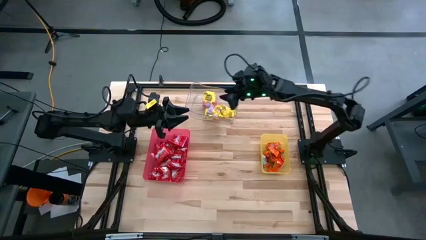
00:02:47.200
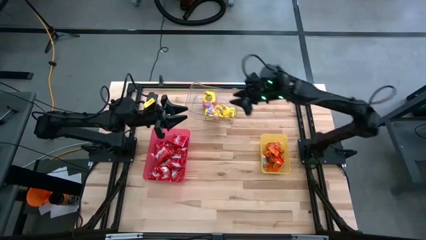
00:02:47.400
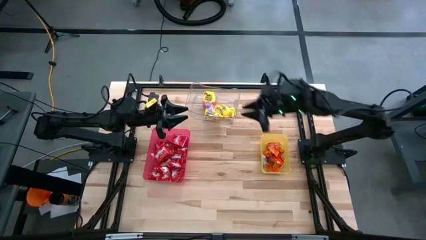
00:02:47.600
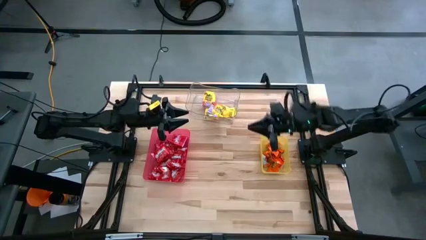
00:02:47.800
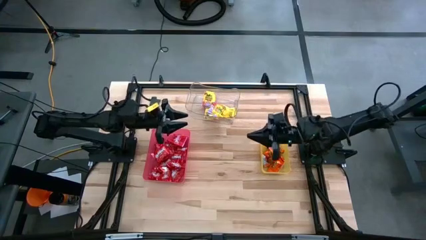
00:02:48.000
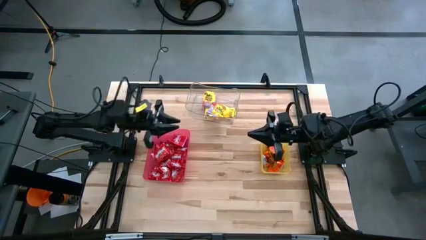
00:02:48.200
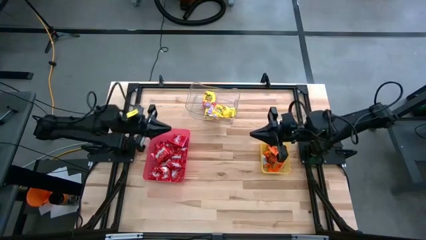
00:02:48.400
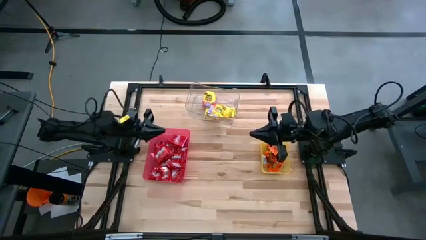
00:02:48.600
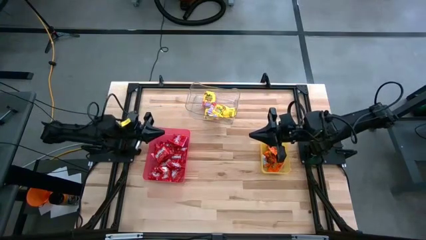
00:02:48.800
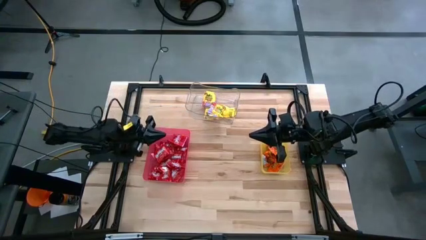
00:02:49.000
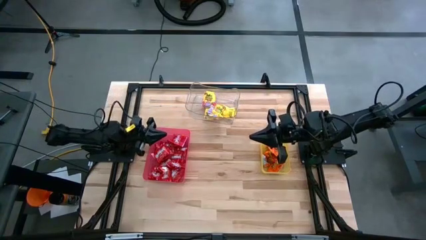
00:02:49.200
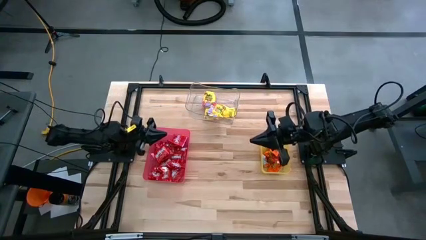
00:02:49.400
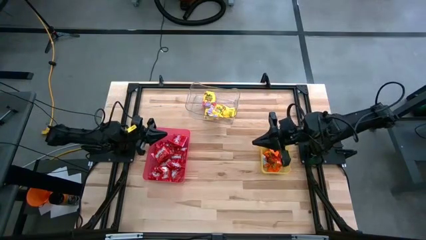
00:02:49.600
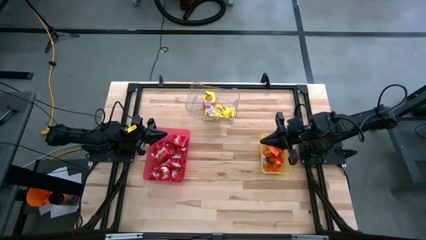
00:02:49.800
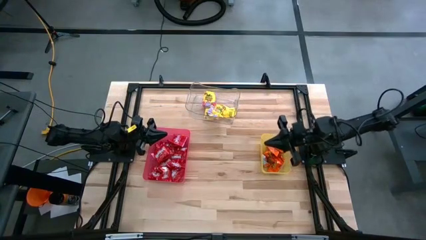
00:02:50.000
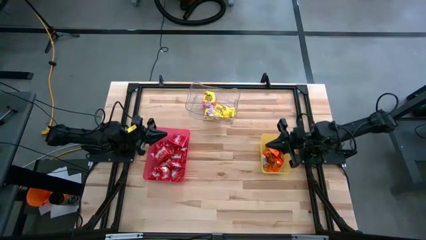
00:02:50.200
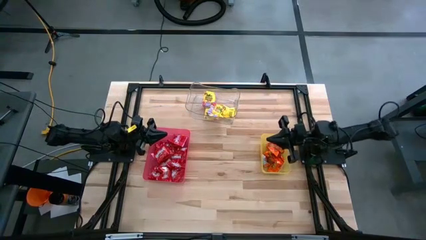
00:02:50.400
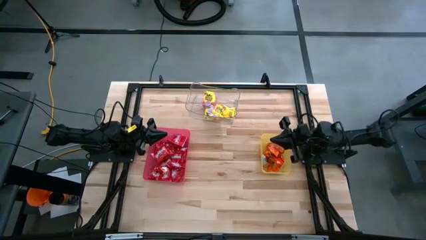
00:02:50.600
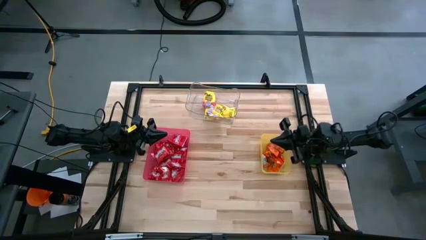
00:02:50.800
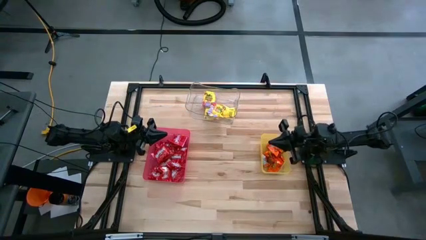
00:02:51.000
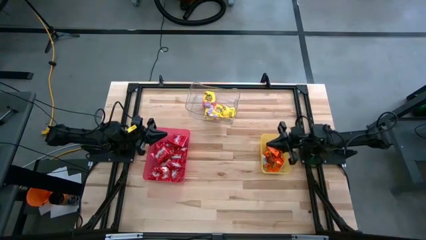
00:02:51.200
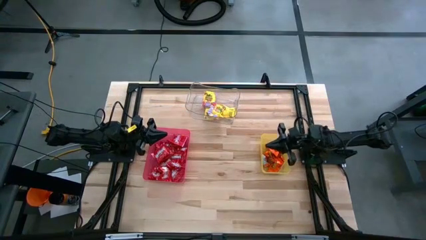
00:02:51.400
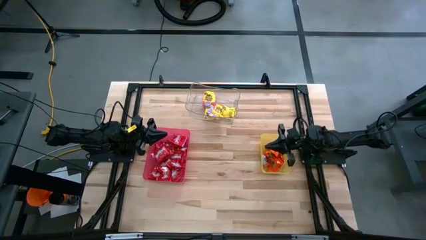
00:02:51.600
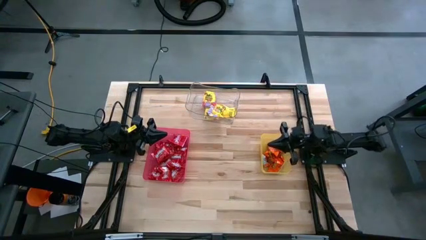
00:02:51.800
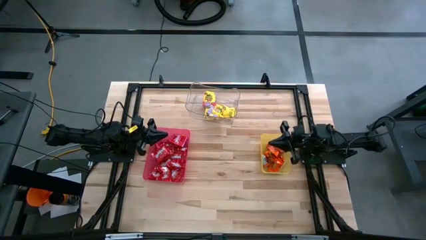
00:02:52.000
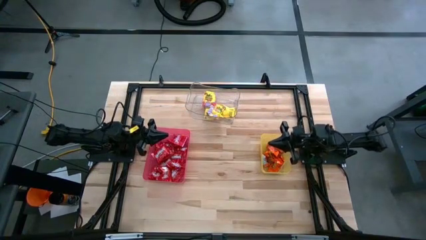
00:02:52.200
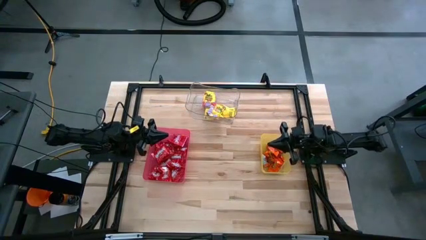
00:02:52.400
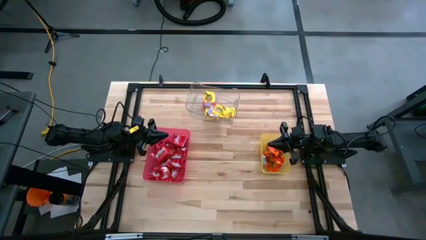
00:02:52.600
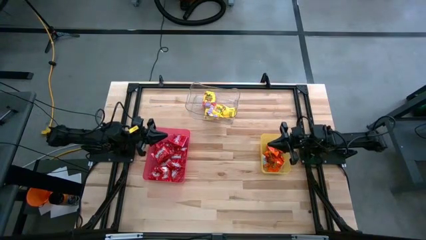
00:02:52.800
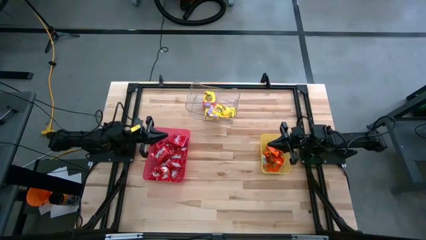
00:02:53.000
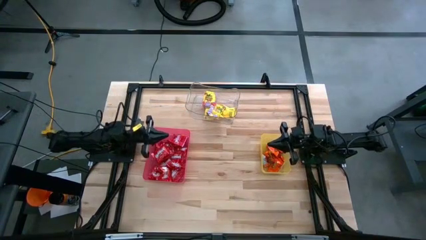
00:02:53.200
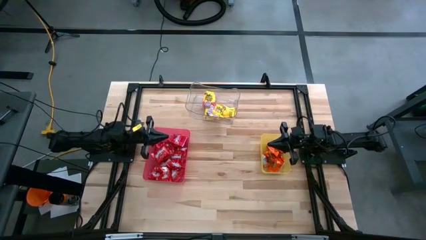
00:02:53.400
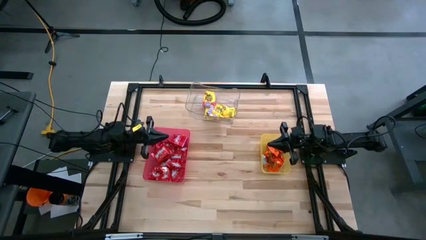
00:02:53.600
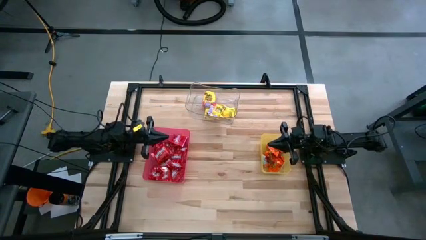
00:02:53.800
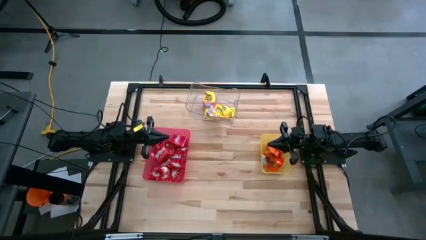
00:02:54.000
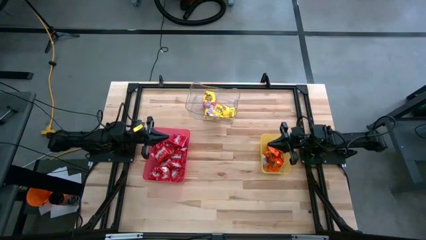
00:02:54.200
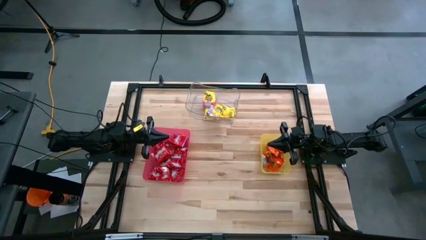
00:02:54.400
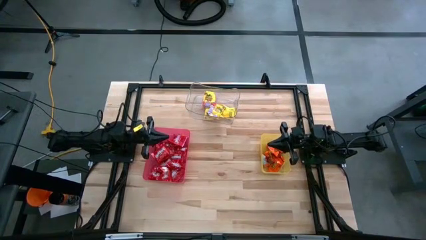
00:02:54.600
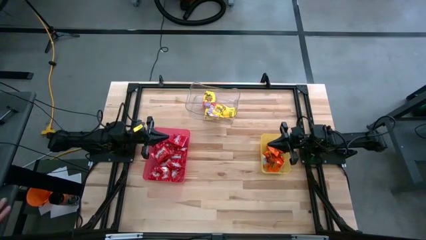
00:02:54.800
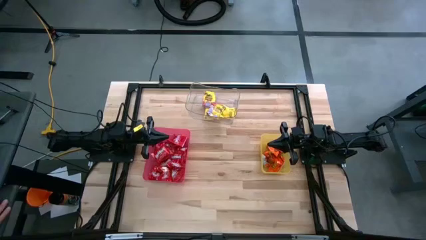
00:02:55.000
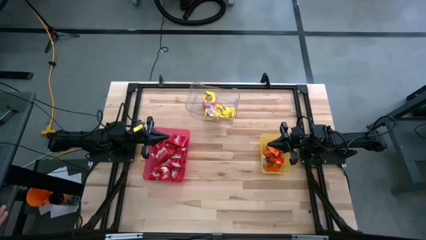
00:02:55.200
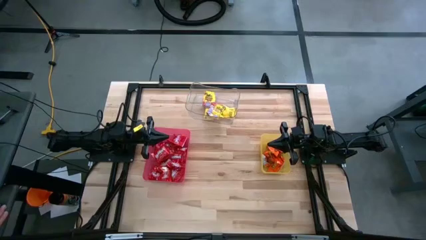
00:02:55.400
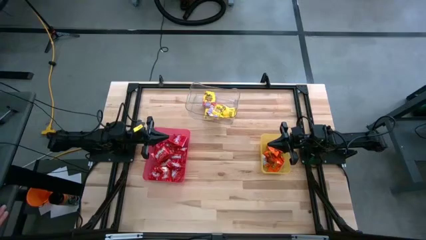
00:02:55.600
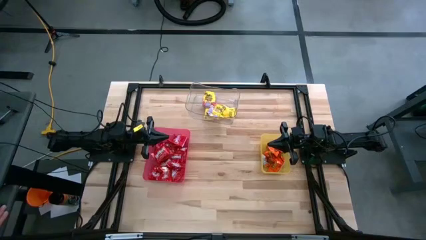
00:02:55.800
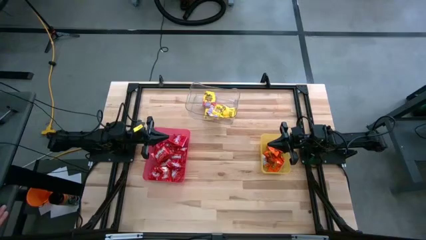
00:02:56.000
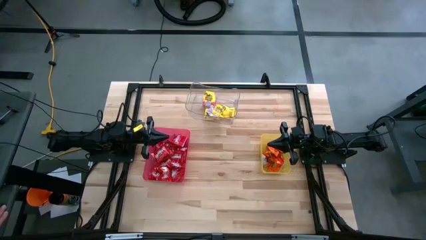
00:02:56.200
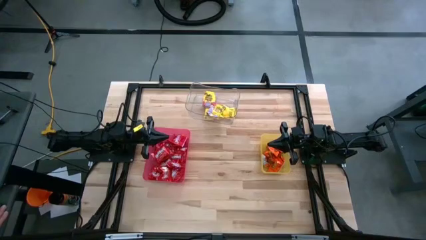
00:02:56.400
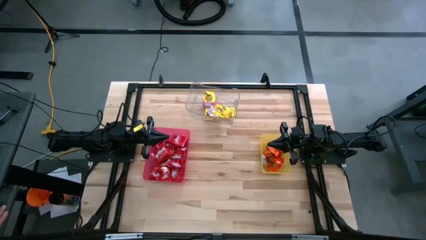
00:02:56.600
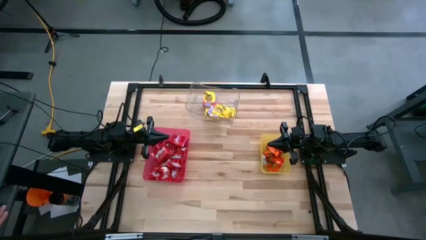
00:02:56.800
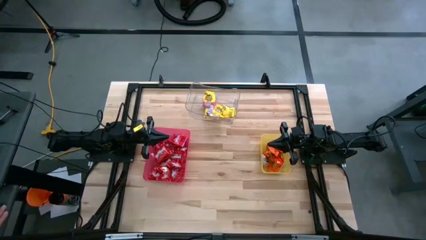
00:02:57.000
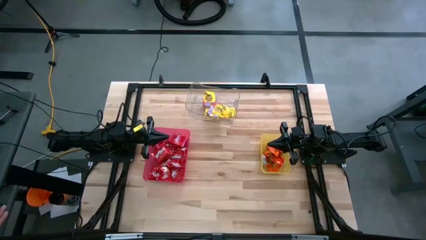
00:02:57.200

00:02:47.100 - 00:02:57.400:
Task: Sort candy
Return to Home Position

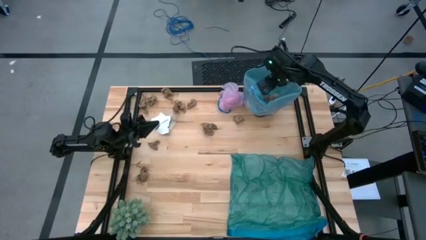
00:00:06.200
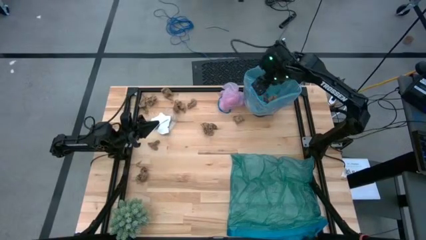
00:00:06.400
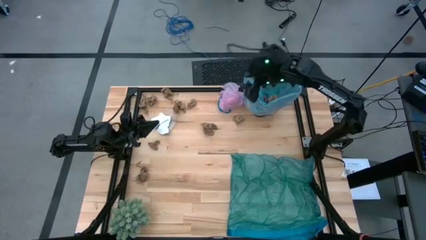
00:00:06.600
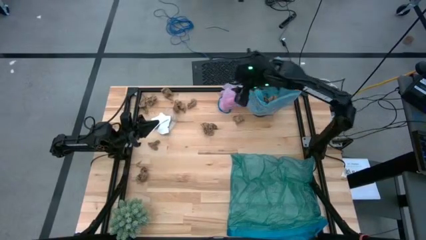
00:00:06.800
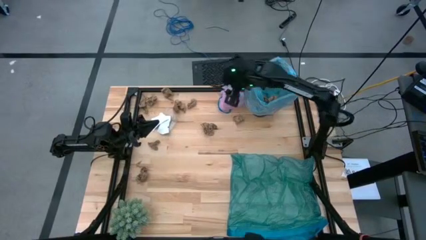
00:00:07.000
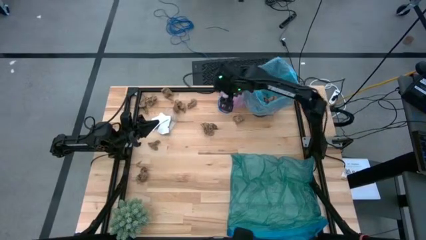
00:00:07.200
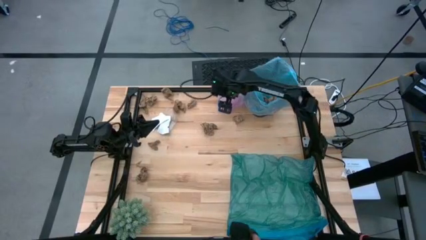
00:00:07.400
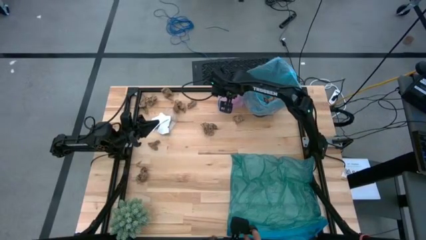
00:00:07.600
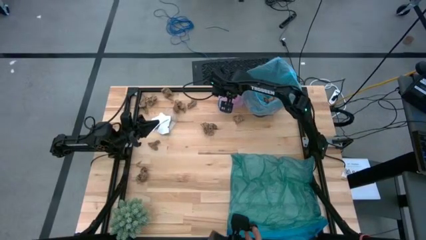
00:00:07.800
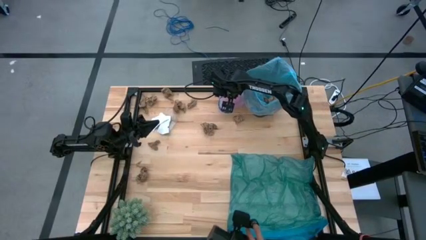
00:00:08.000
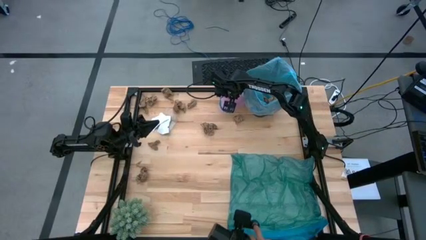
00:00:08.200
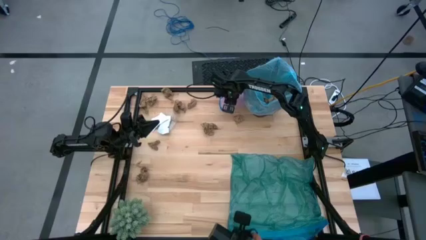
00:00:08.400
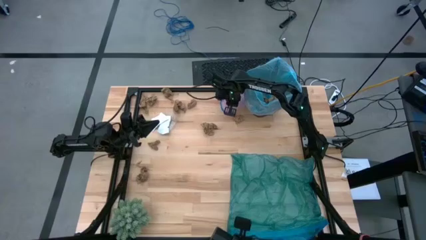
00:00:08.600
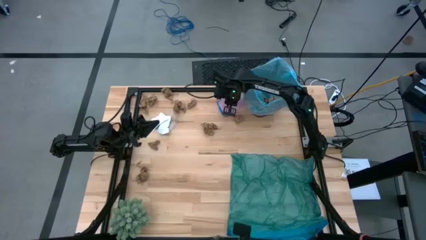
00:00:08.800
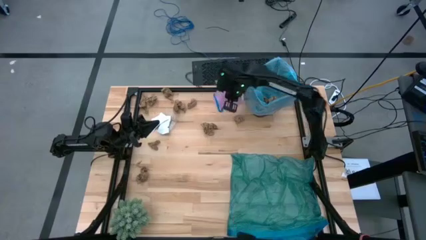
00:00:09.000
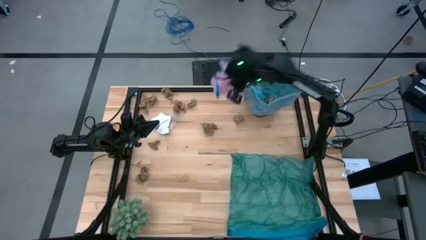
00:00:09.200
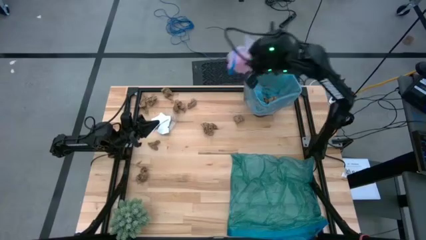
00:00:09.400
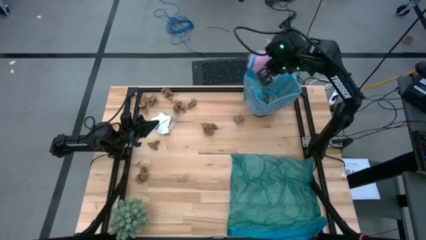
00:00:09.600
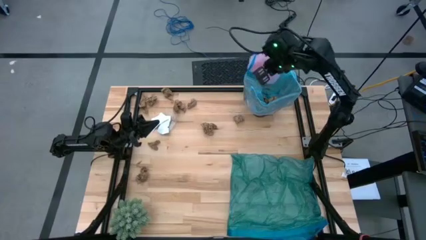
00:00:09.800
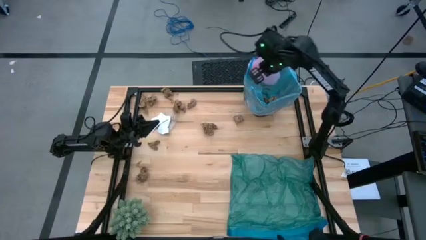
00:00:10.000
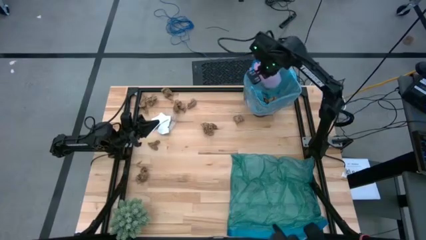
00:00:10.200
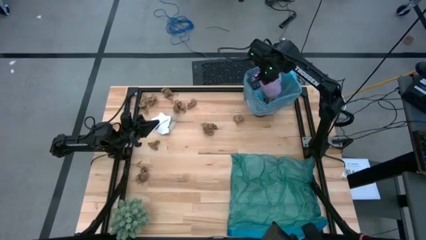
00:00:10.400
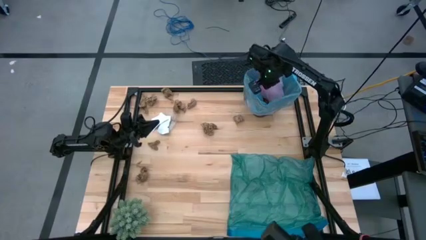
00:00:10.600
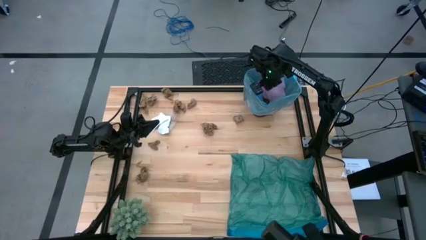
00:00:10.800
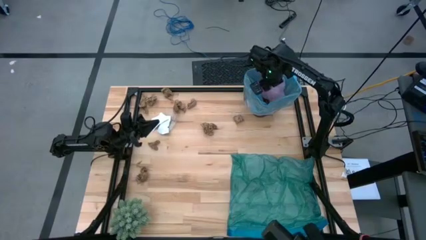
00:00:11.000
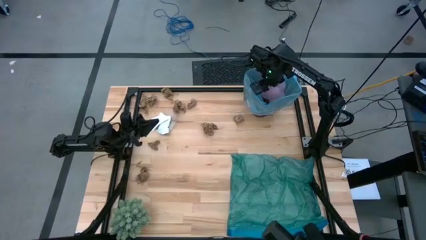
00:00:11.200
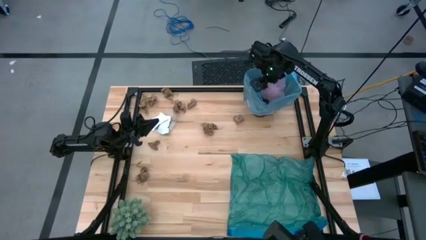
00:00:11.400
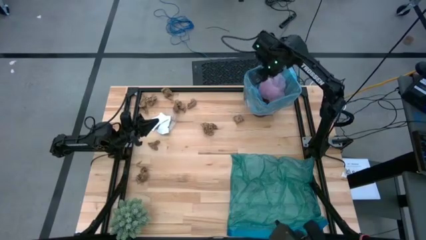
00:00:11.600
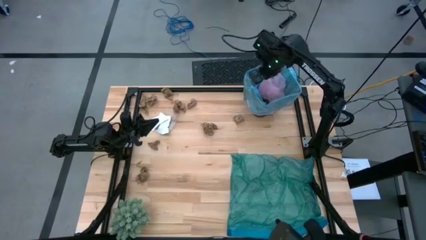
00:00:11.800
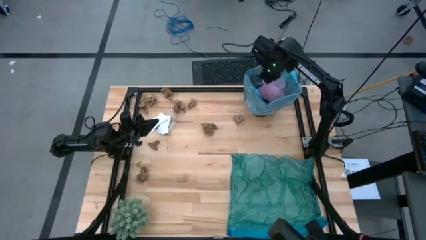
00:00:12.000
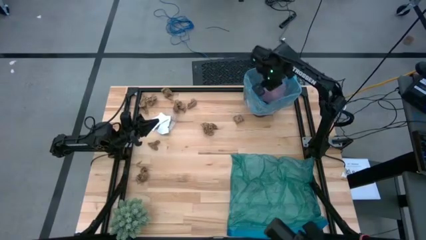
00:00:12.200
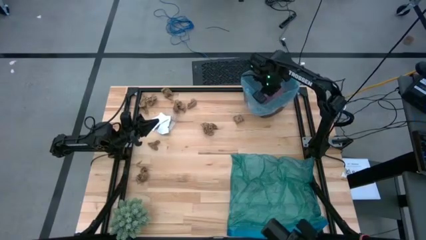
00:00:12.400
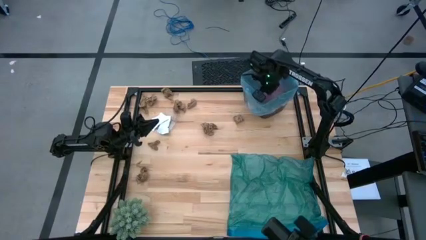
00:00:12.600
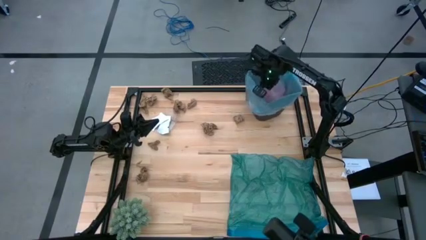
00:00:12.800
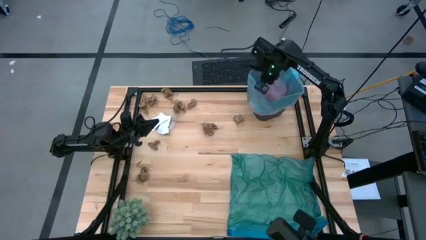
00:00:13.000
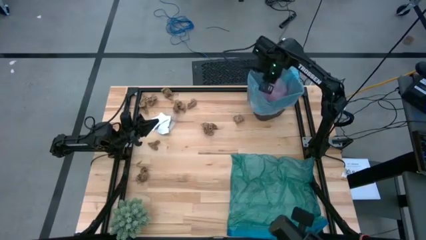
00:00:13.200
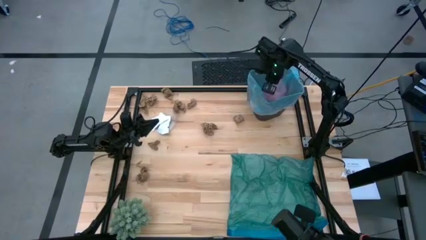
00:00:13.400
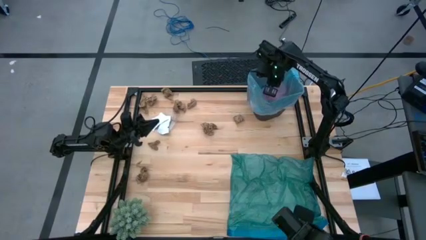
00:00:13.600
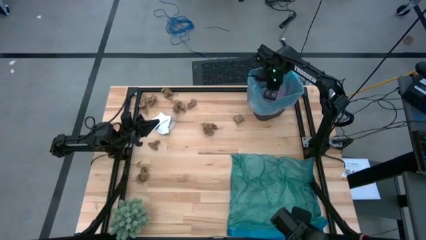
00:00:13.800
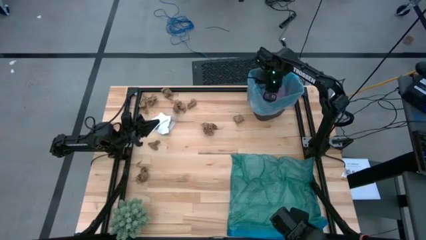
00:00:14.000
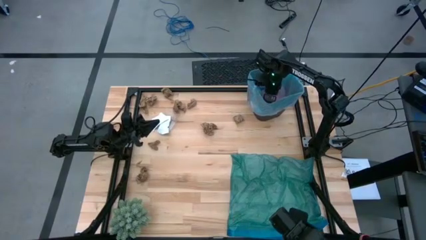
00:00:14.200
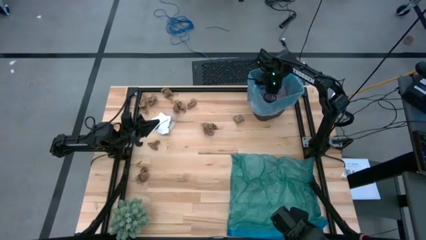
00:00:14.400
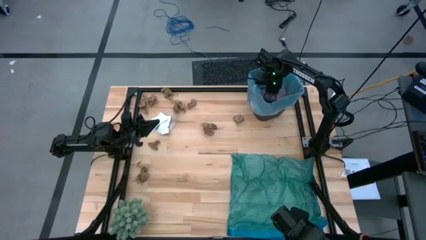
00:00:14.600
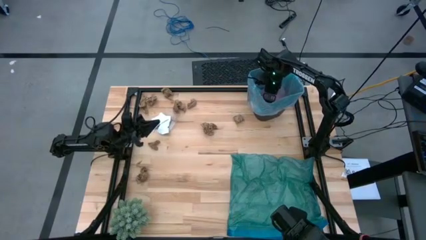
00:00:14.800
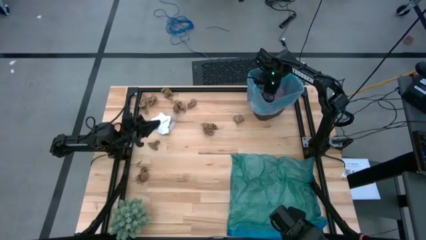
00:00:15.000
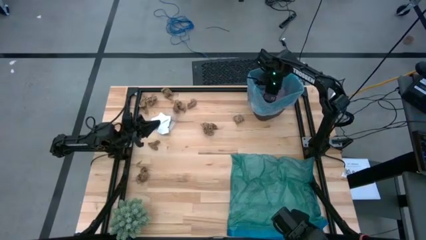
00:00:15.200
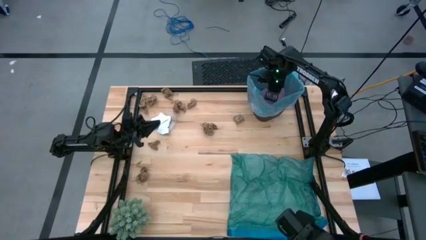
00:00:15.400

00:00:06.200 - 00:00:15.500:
Task: place trash/remove bag and relplace
Put the pink trash bag into the black trash bin
